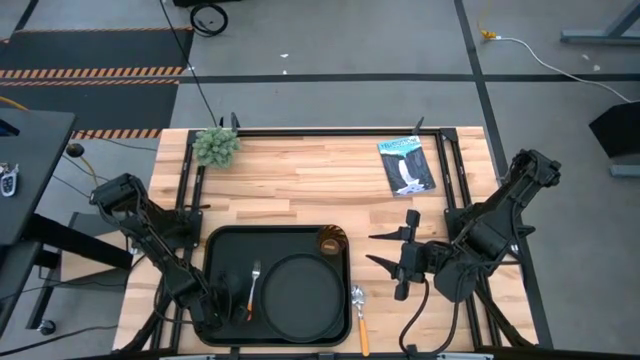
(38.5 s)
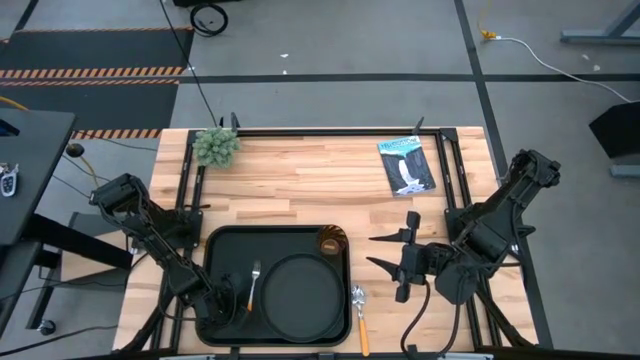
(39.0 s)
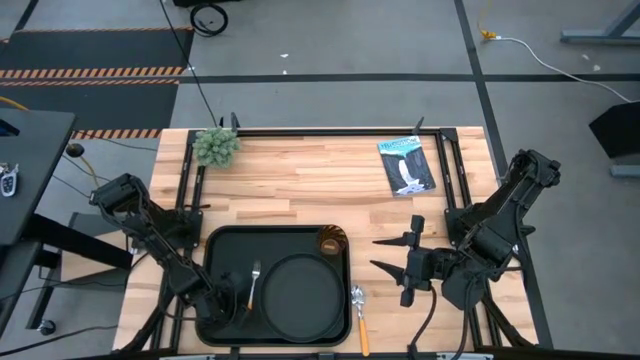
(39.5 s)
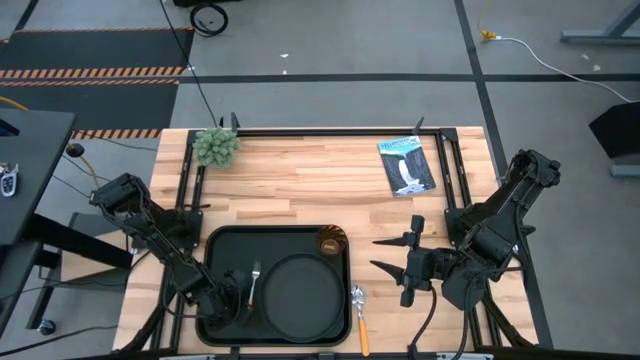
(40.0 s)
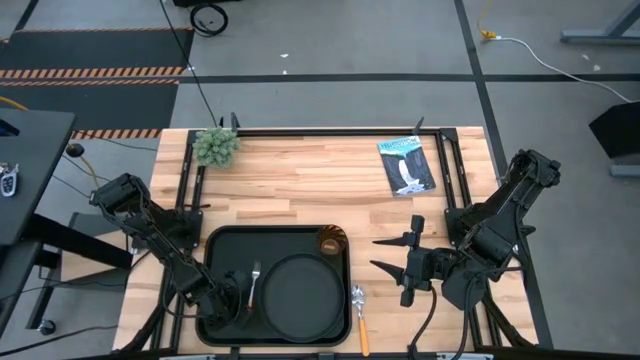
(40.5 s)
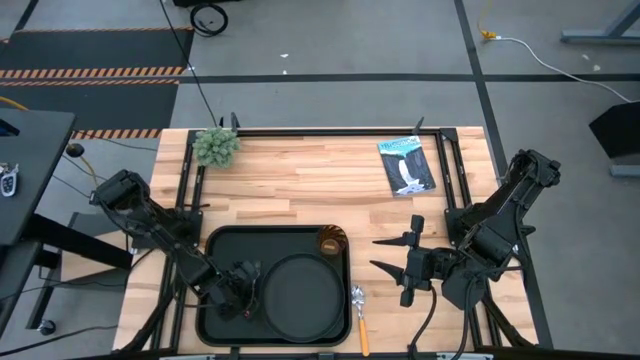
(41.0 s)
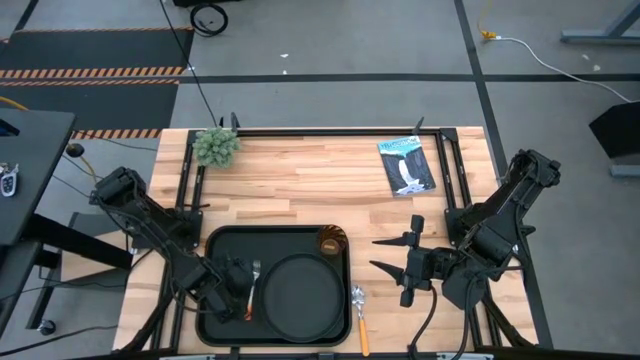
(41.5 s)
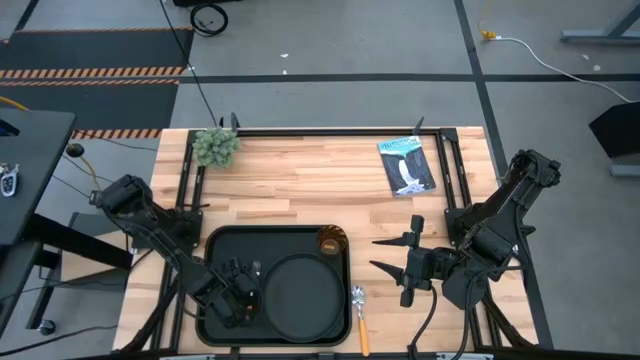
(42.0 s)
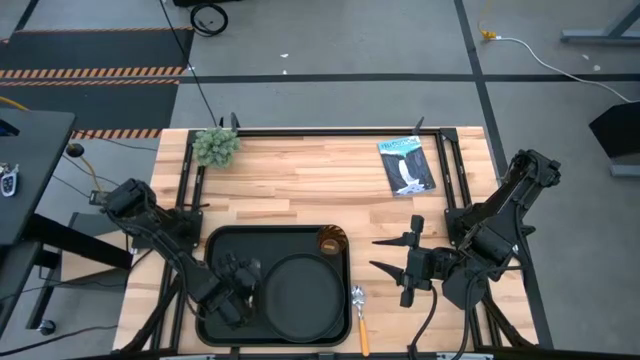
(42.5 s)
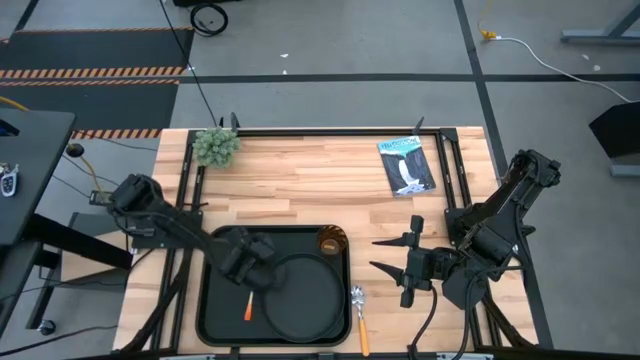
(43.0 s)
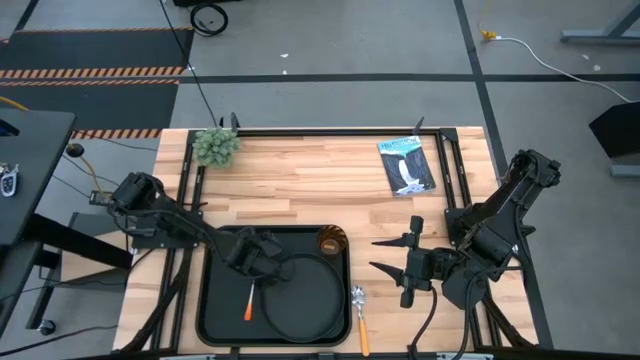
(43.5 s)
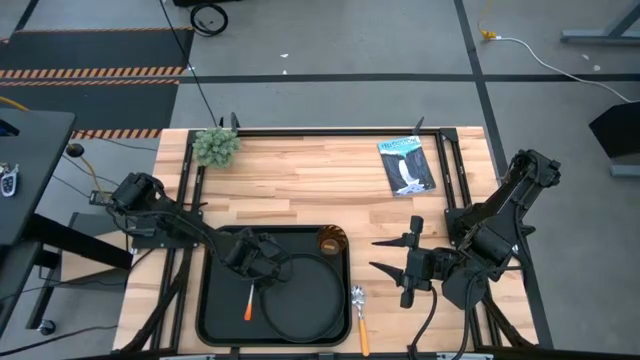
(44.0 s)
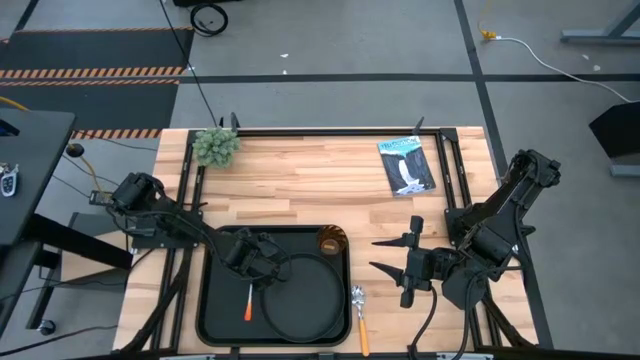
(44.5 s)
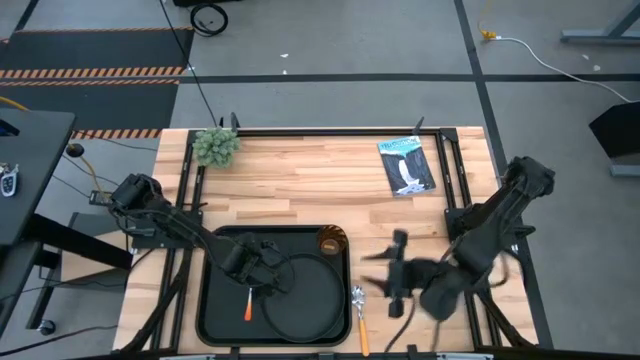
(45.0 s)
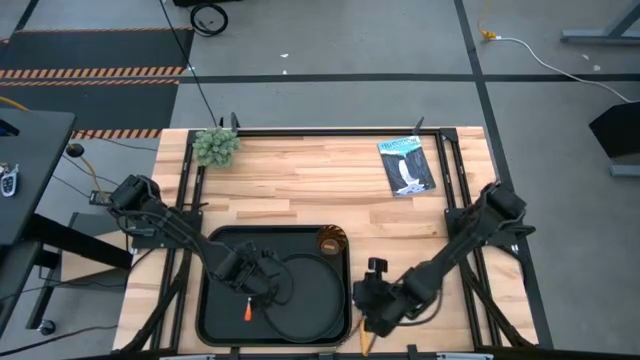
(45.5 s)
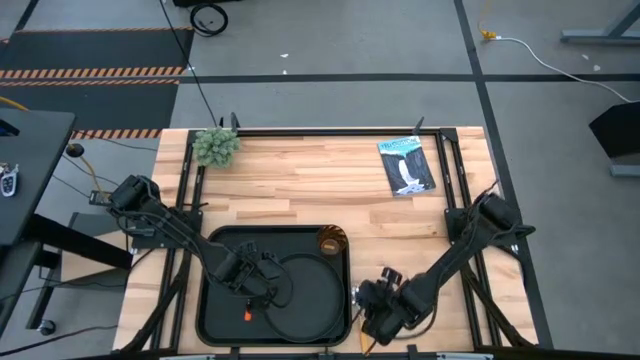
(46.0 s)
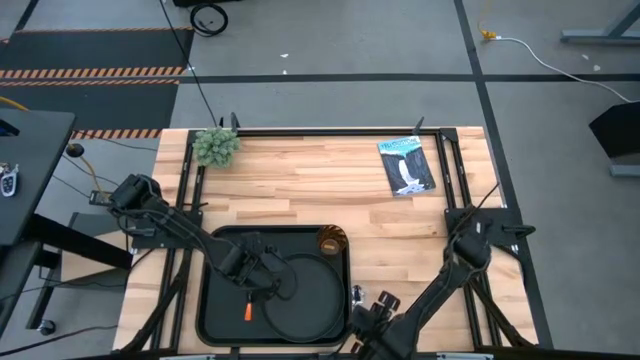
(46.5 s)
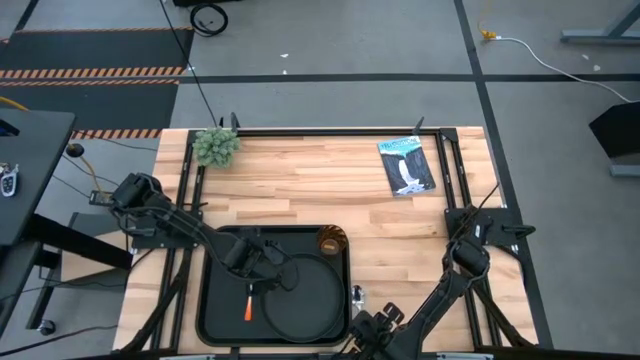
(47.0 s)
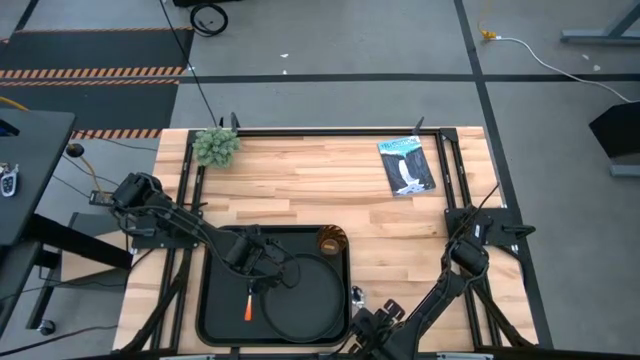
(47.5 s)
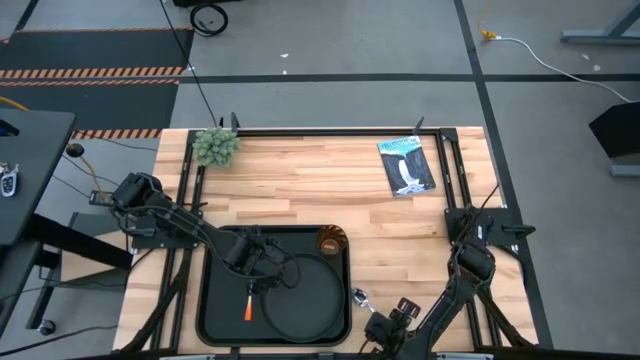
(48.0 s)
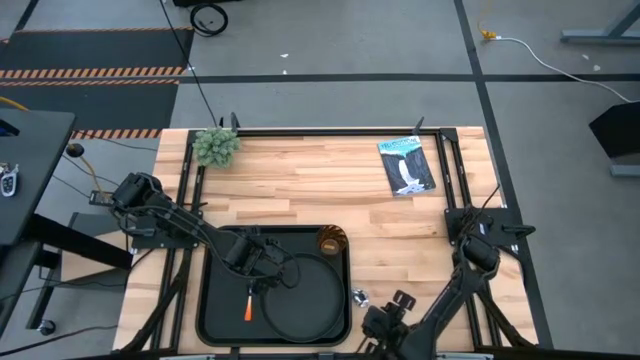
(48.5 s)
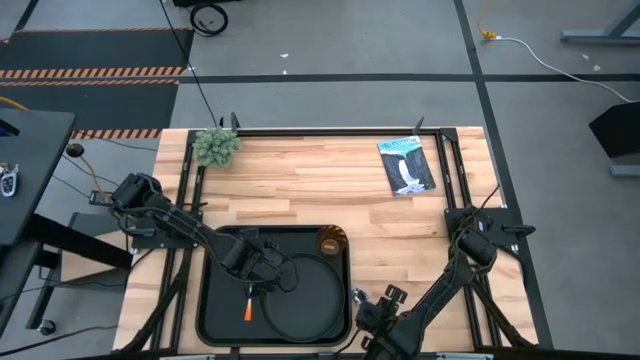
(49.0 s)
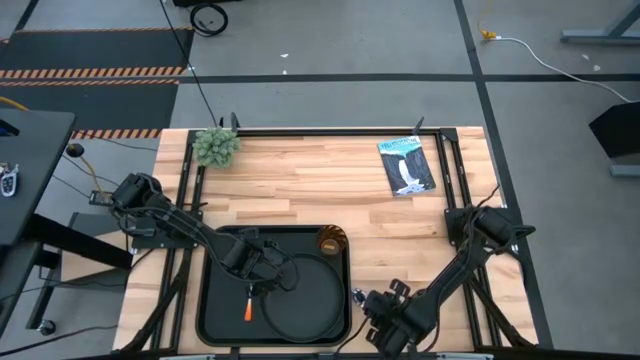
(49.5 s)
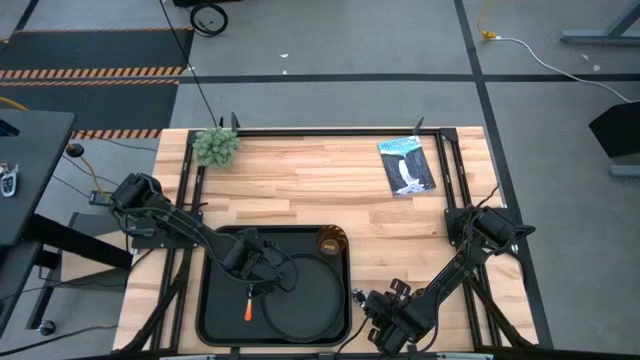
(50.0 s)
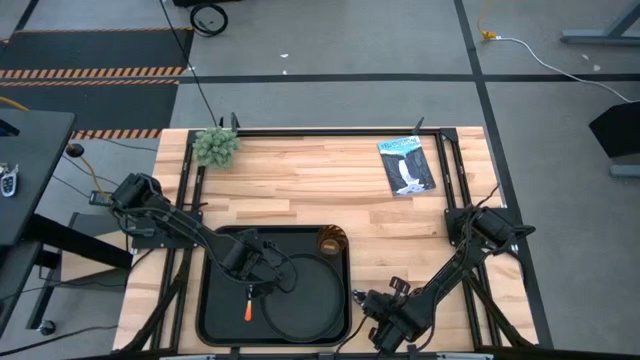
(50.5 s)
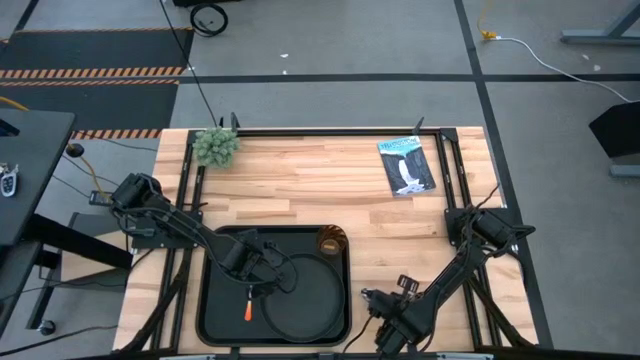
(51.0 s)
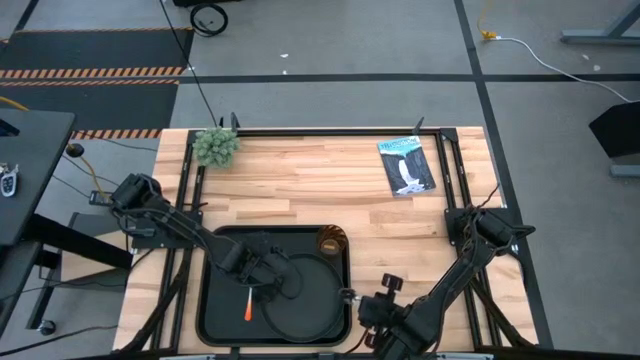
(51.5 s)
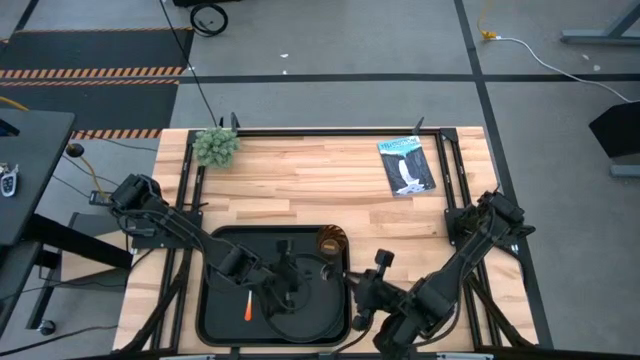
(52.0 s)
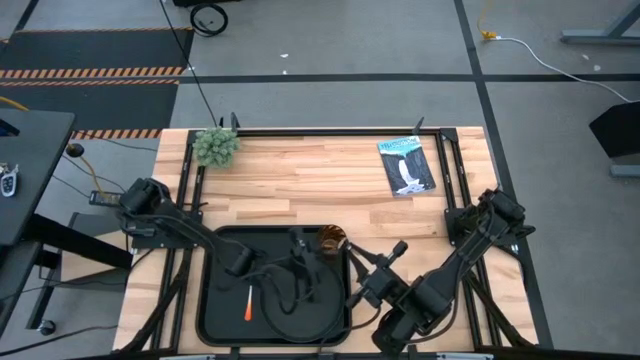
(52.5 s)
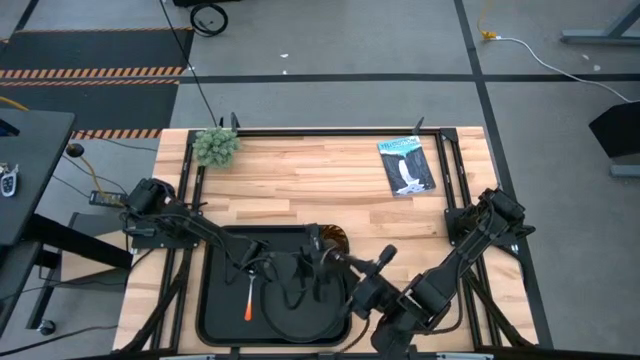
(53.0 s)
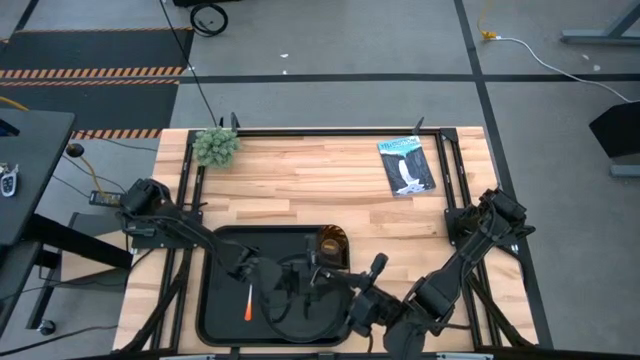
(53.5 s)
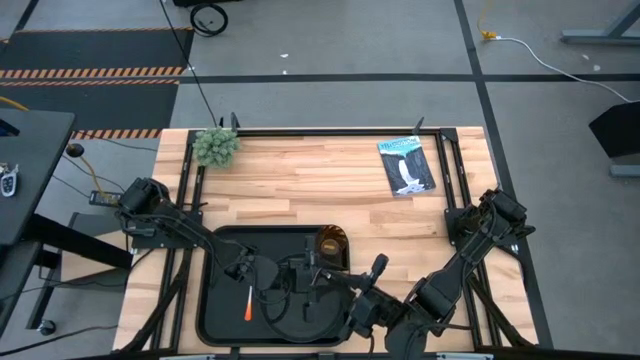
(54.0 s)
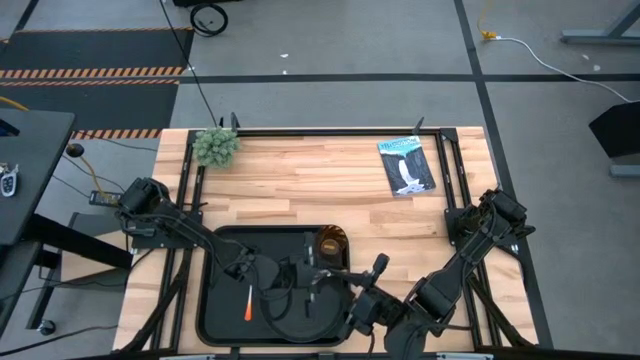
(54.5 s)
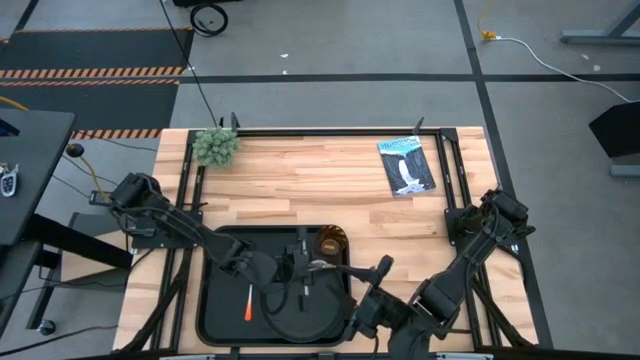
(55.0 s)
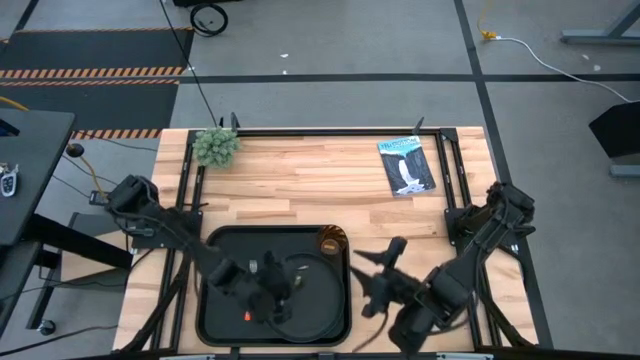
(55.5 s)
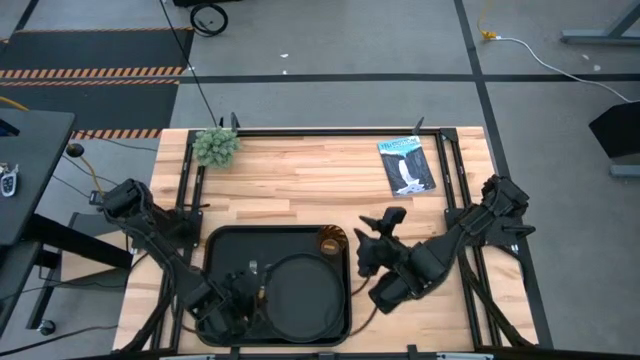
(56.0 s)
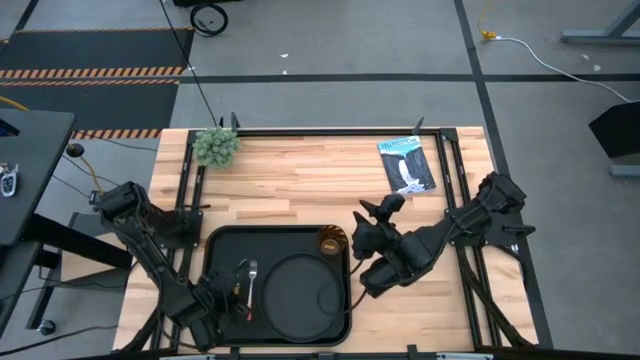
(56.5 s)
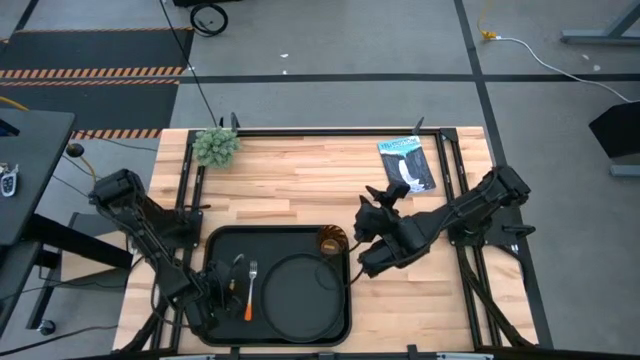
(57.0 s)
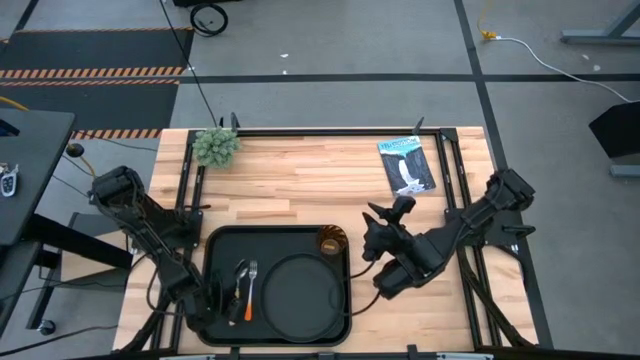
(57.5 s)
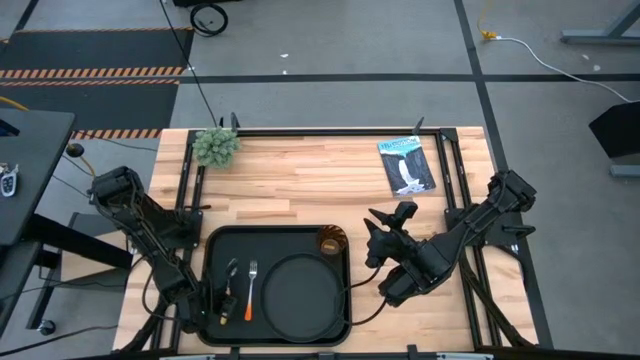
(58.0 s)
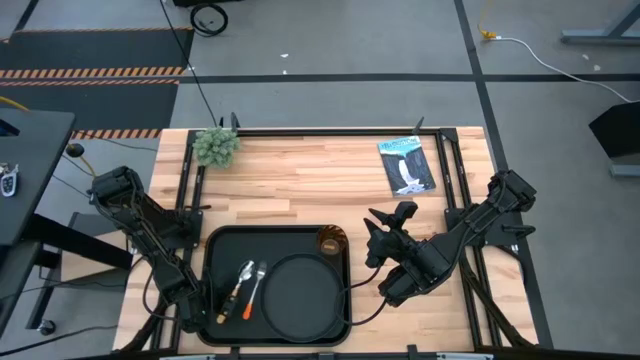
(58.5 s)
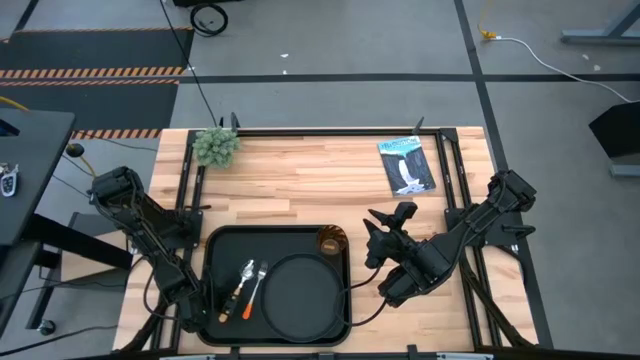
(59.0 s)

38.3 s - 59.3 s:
Task: Pick and place plate/cup/fork/spoon on tray
Put the brown spoon on the black tray
